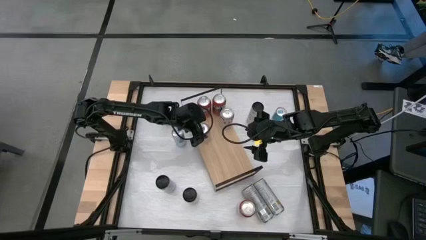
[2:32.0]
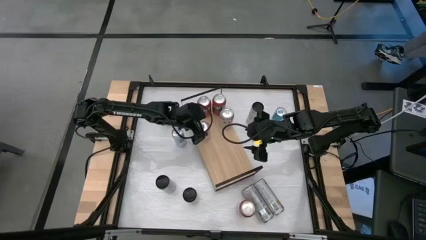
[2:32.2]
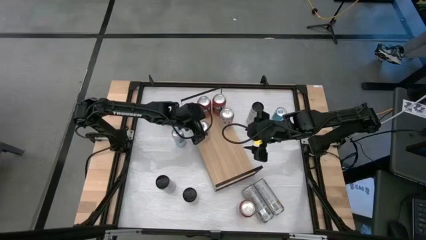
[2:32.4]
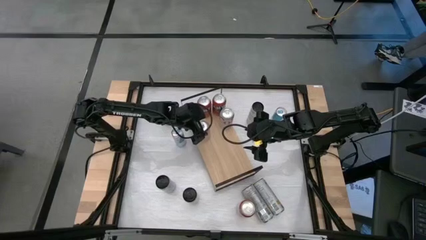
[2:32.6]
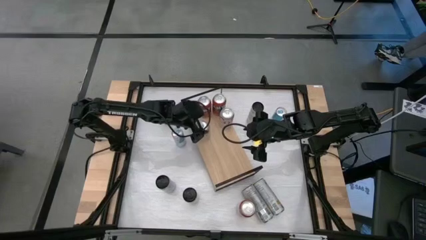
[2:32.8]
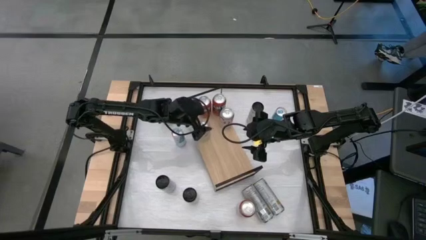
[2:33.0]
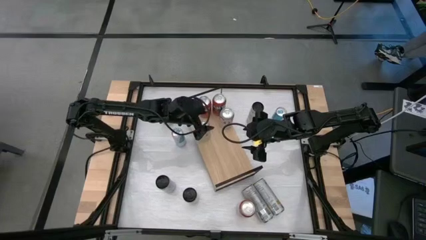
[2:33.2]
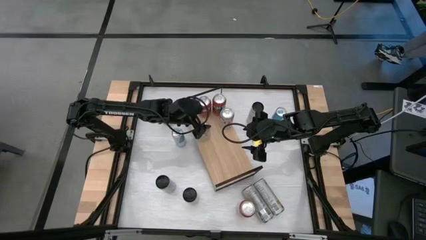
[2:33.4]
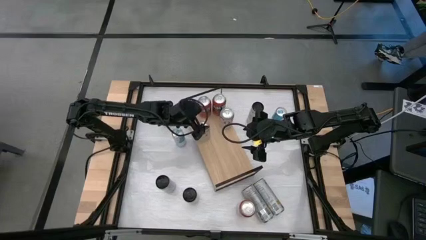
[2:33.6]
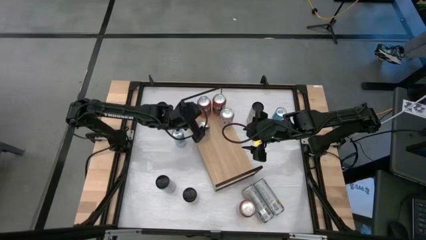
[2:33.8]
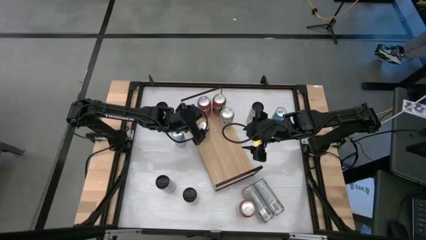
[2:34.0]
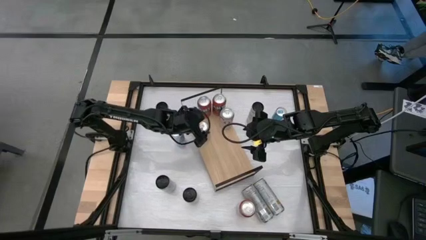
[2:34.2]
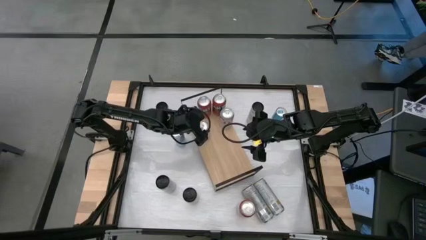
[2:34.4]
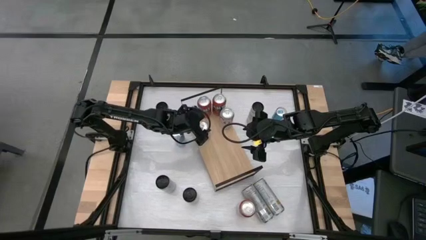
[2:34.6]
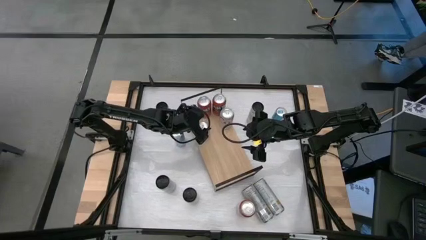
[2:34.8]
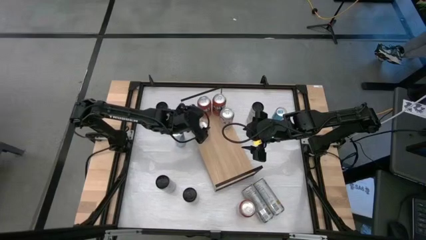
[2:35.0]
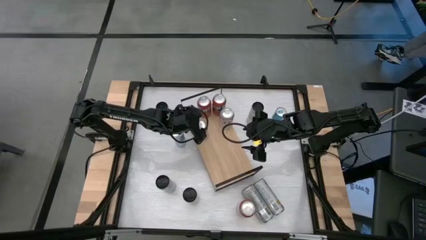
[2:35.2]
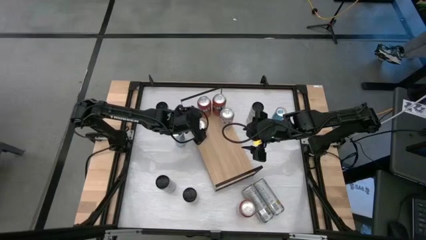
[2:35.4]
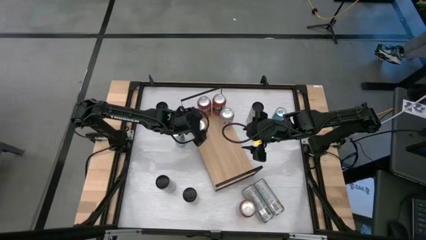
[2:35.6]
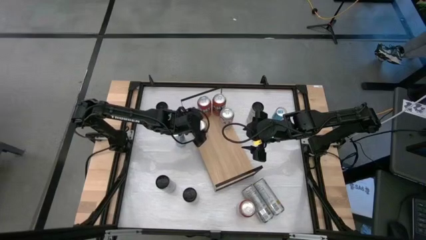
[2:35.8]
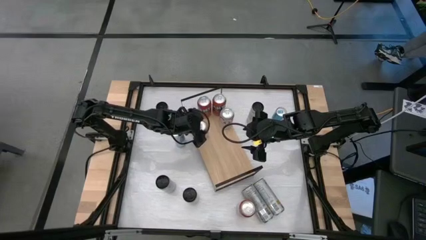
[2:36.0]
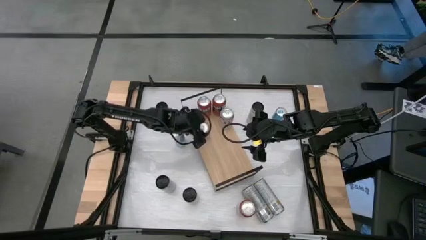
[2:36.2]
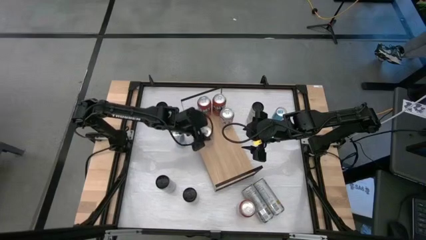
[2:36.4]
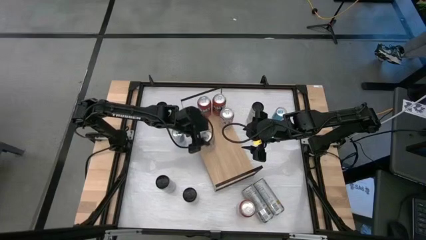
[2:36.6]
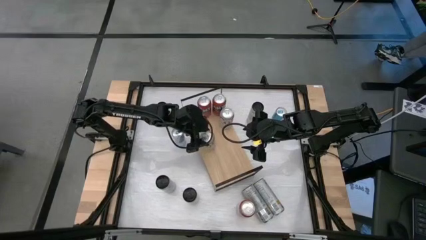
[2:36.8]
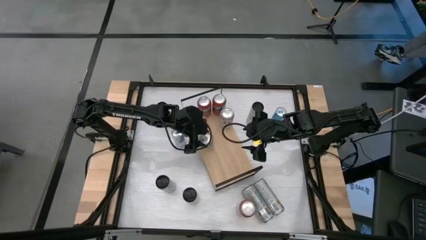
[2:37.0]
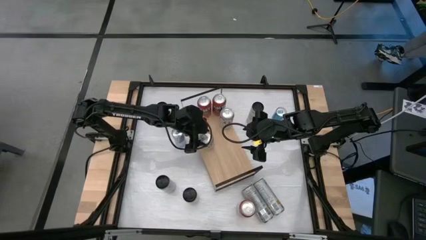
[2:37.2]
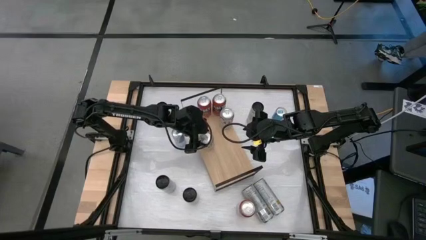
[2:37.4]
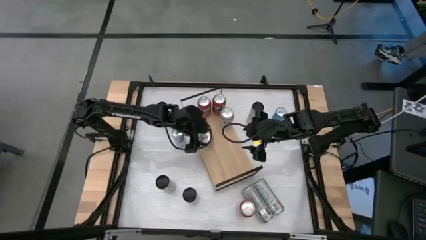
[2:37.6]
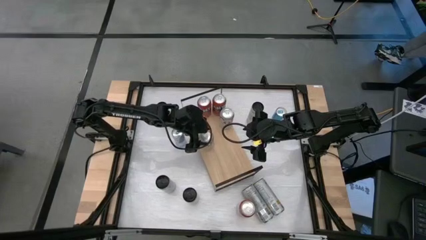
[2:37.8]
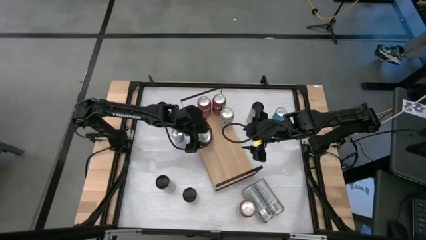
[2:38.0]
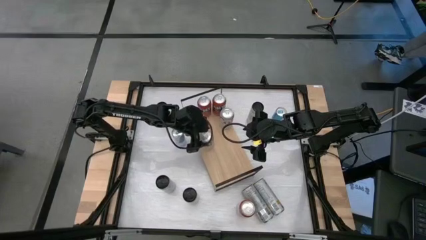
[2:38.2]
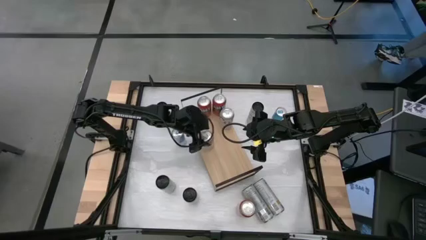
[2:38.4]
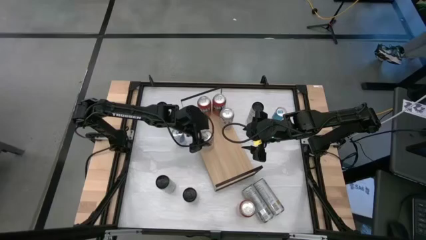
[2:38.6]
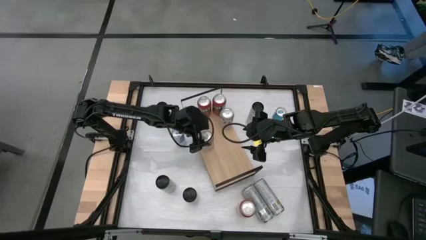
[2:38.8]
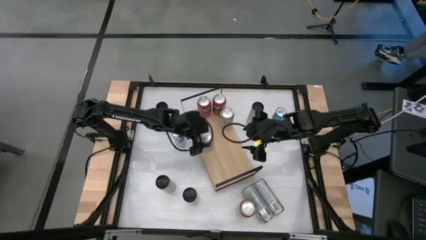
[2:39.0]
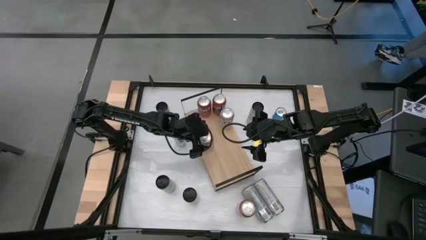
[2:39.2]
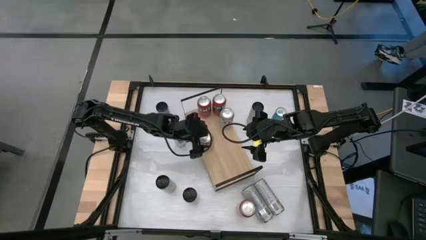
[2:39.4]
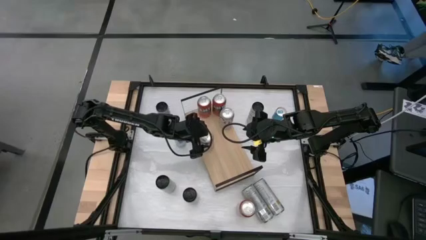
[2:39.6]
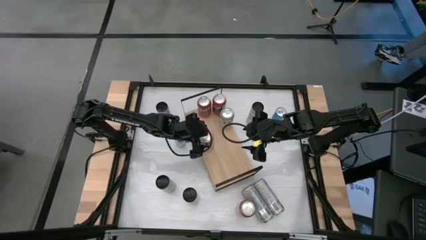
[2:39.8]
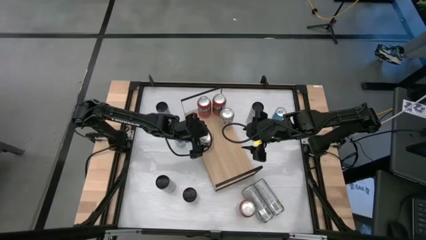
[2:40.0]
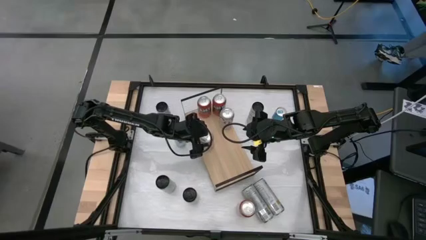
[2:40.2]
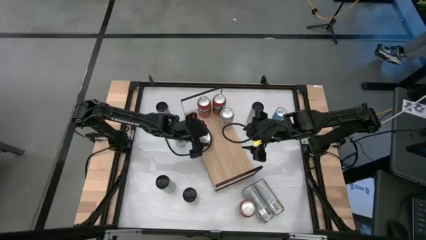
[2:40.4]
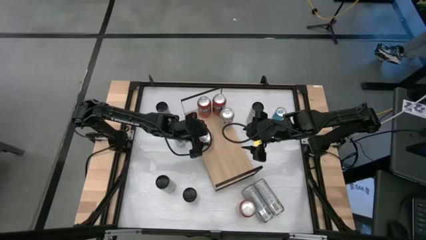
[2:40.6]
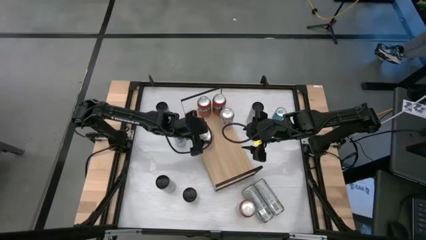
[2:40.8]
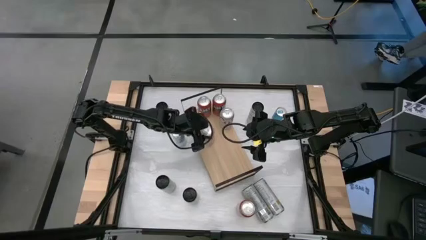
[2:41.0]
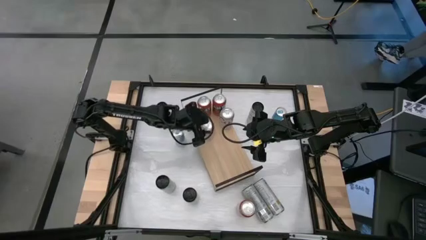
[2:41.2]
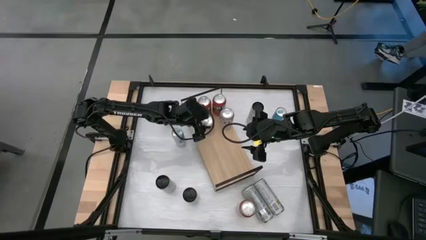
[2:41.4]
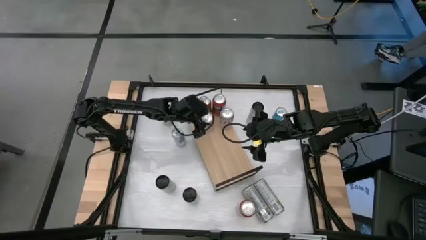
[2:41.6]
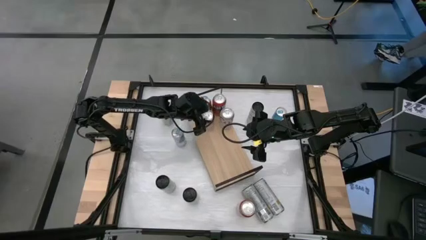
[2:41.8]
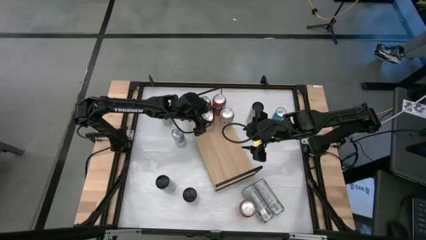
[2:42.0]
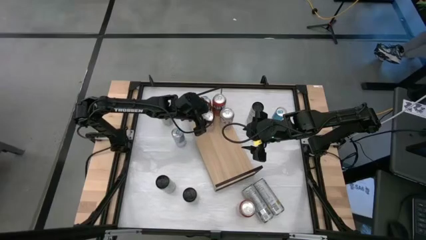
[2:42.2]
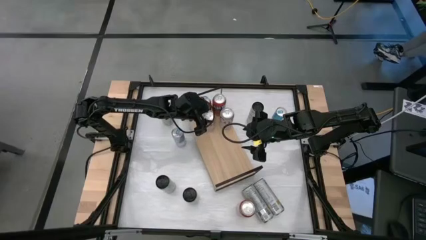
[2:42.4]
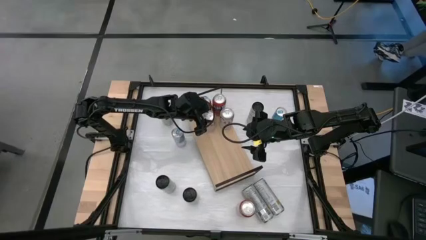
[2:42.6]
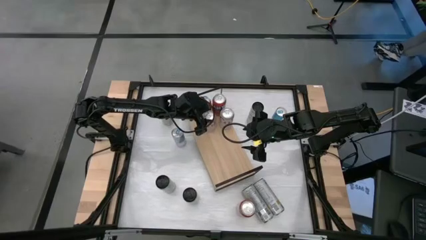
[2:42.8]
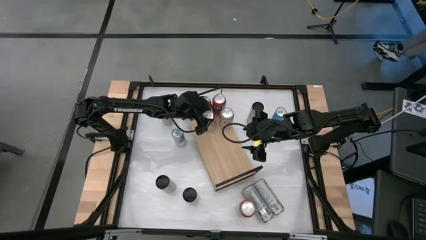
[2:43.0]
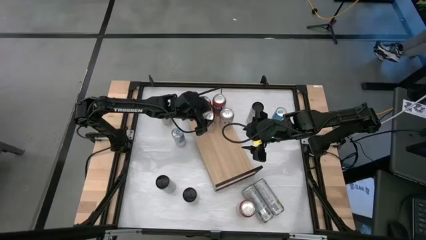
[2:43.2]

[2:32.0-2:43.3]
Task: Place canned beverage on shelf
Align the white soda can with the other white soda can

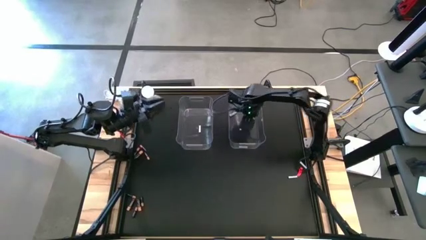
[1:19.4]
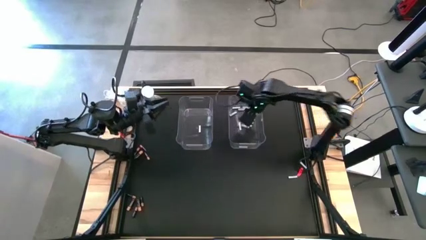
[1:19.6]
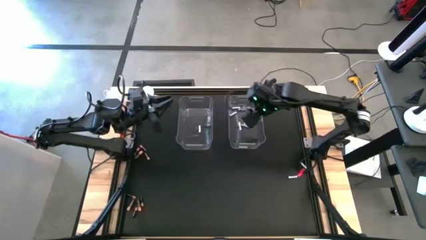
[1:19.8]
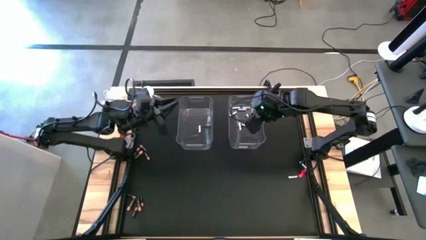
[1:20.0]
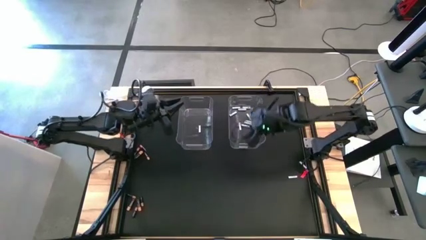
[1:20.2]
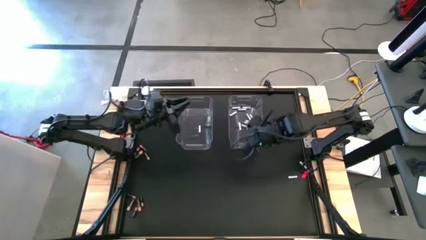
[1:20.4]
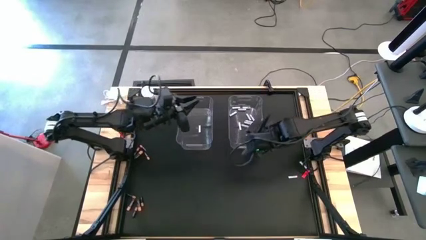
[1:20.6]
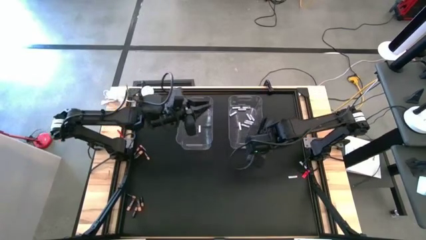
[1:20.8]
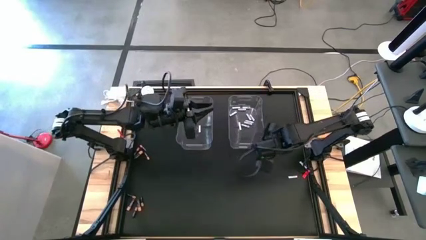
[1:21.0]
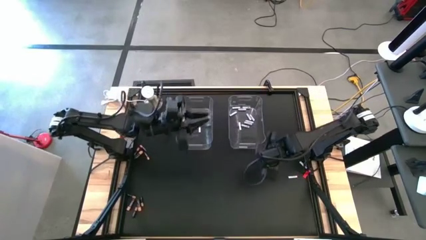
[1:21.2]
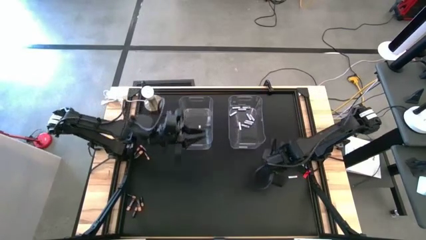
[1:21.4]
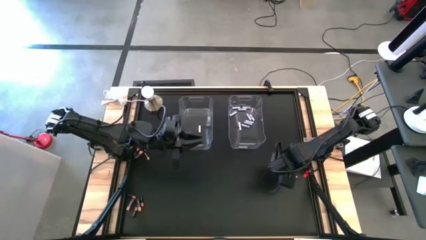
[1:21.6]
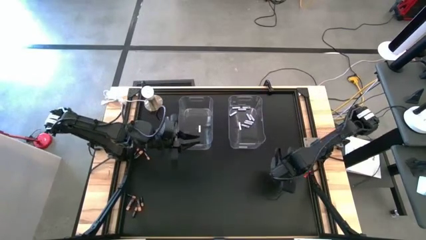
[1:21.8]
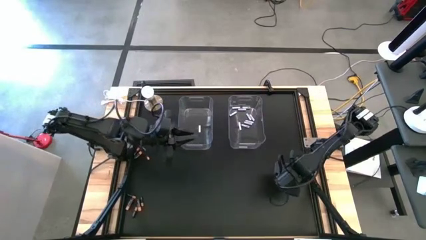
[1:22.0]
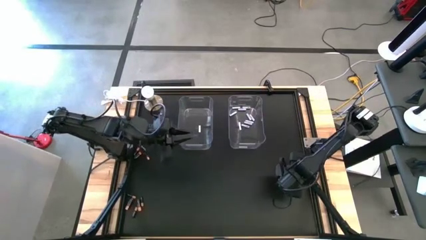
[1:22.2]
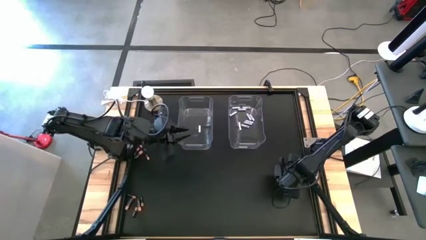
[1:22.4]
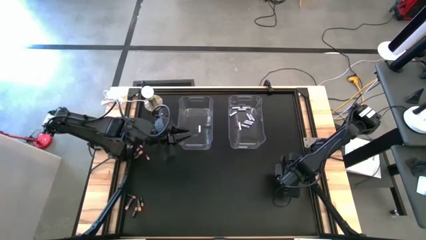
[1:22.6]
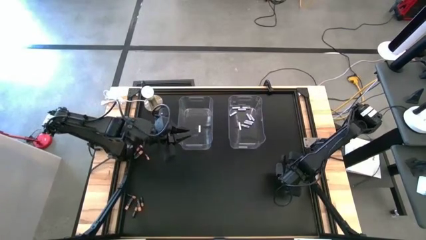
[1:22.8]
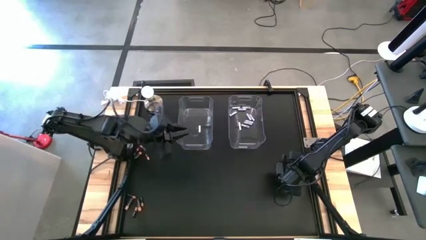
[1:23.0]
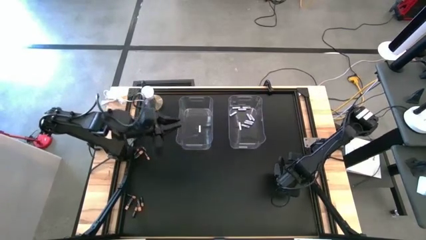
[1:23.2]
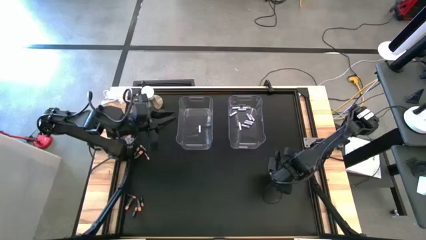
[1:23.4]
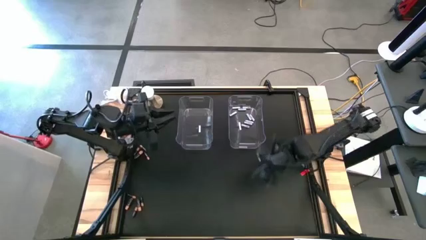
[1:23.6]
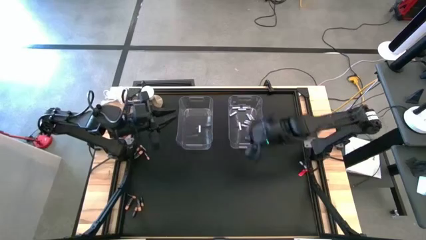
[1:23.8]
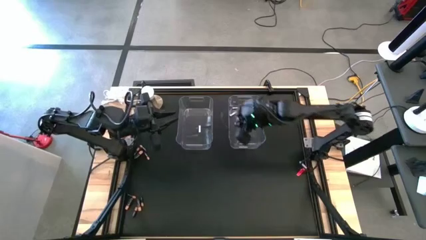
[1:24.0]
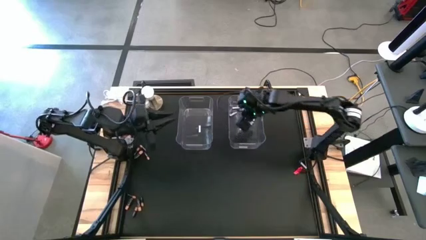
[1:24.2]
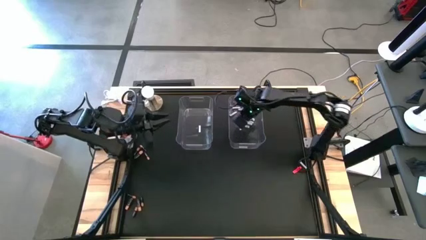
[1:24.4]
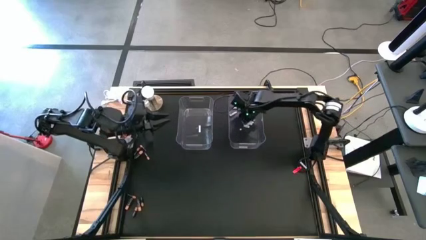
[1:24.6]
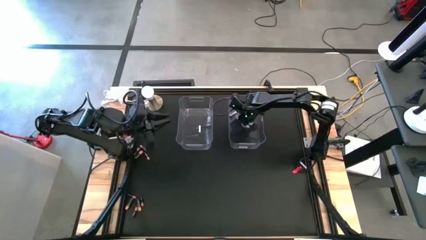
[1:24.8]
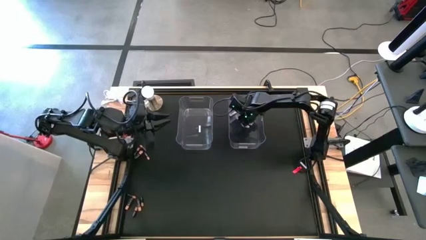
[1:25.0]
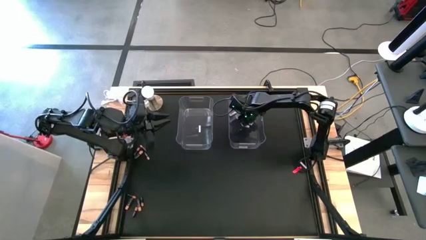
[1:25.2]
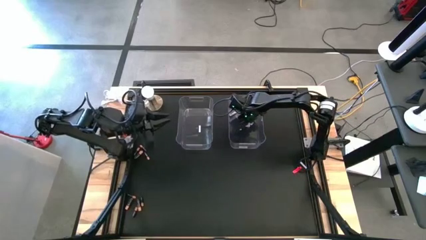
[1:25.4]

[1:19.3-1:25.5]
Task: Sort batteries
Put the white battery into the right transparent bin
